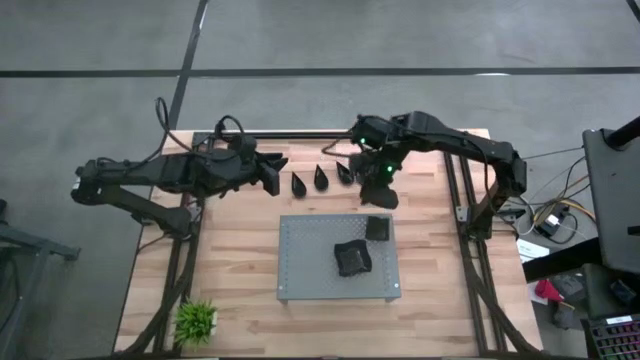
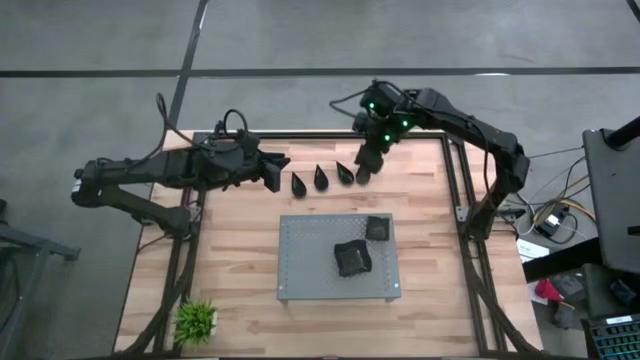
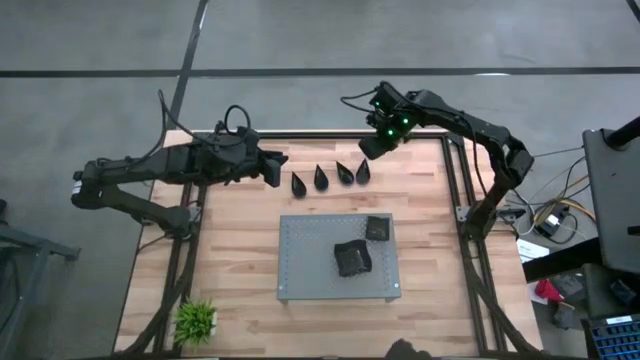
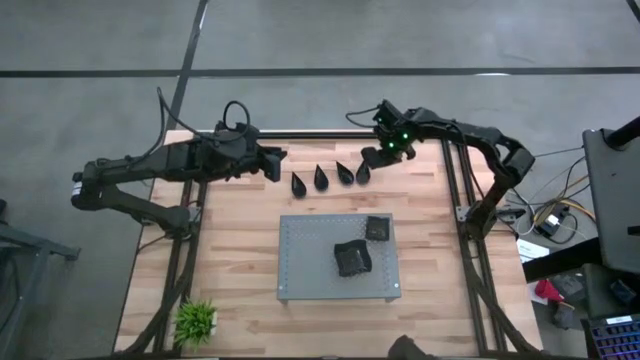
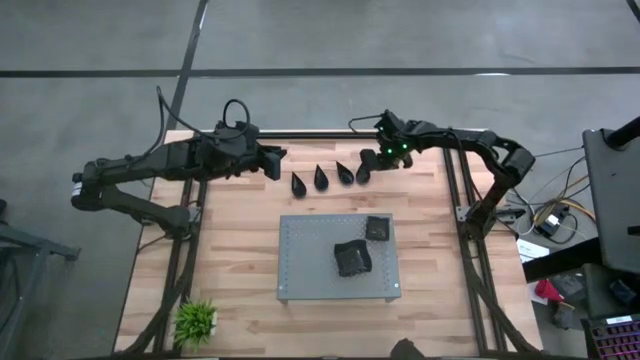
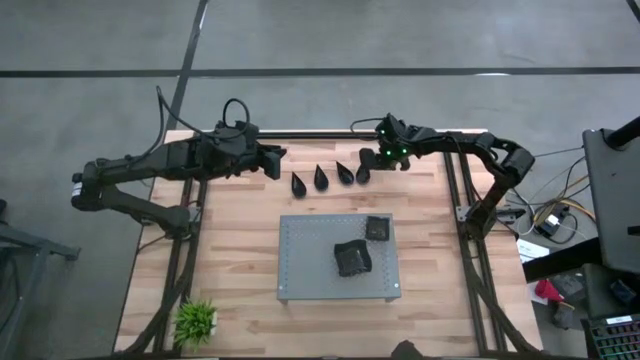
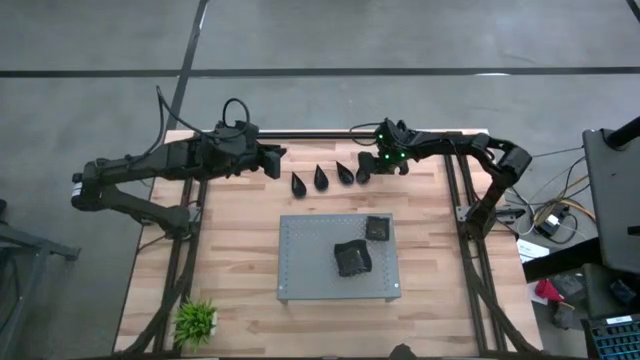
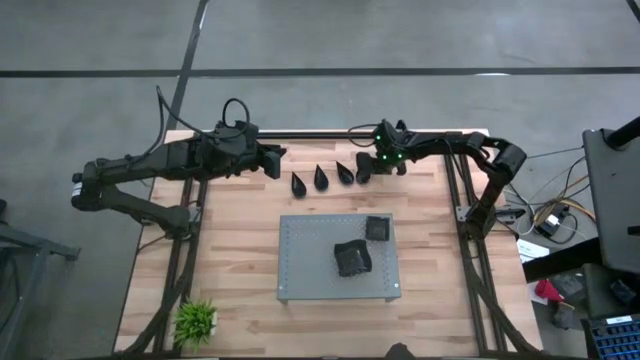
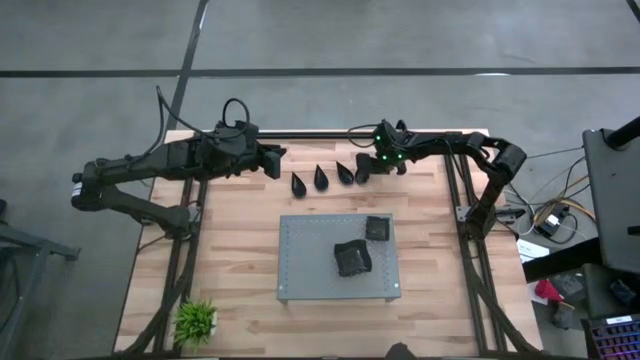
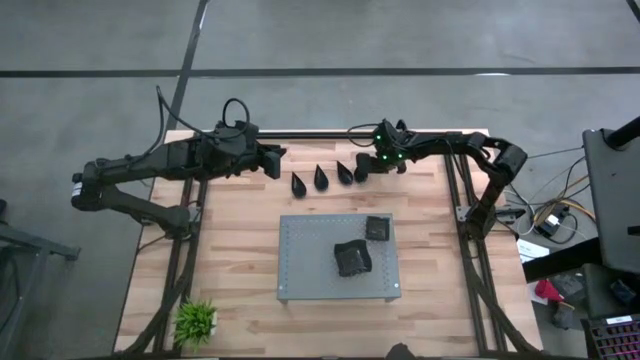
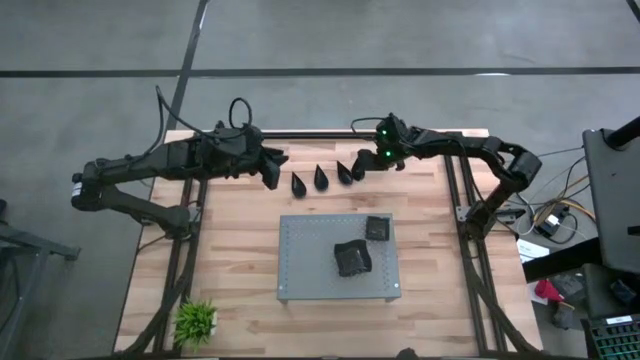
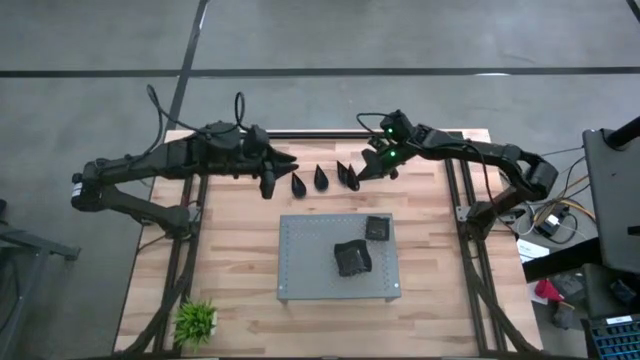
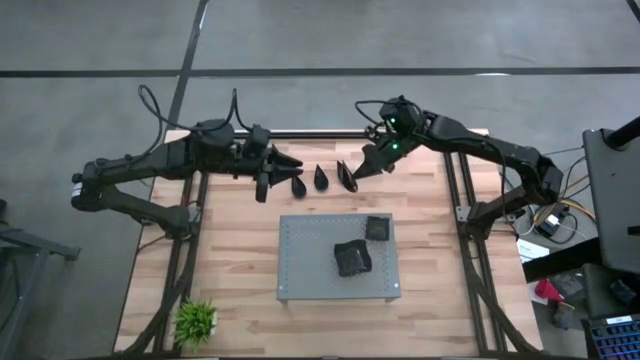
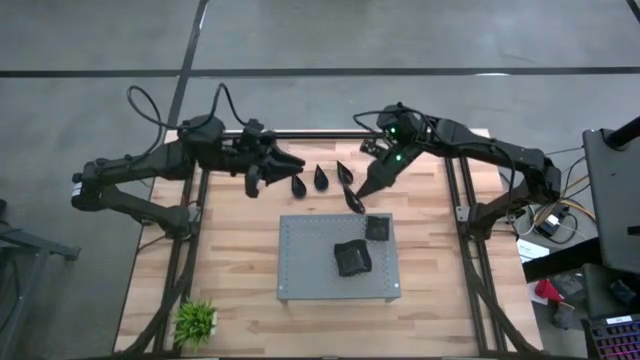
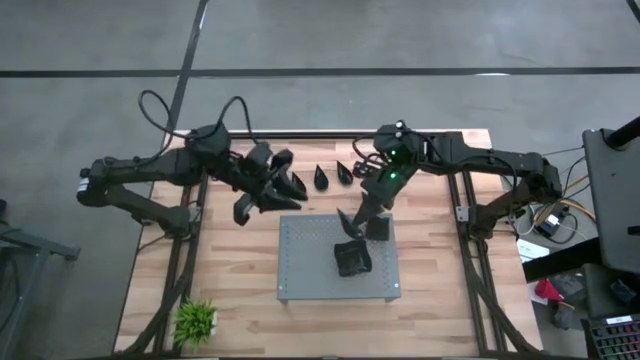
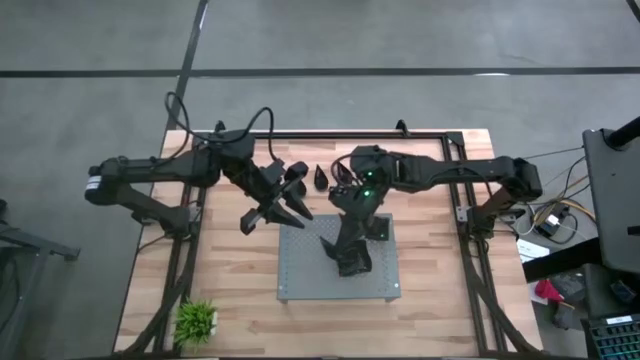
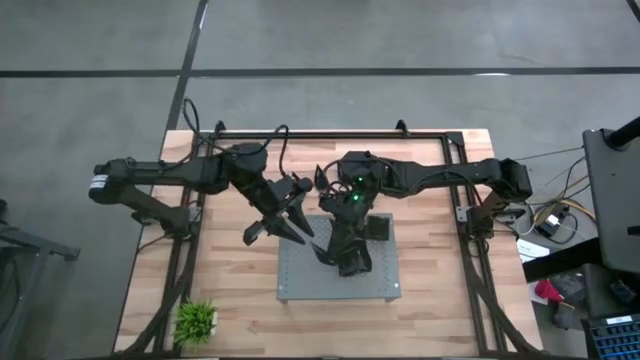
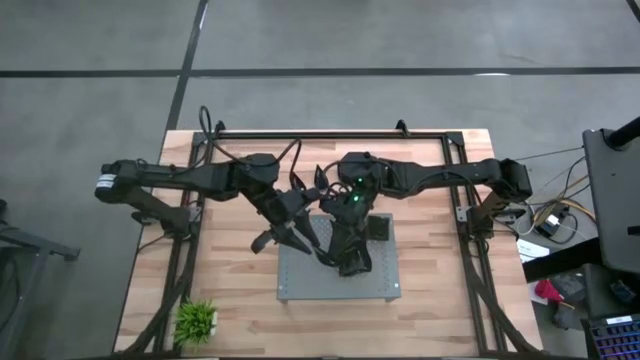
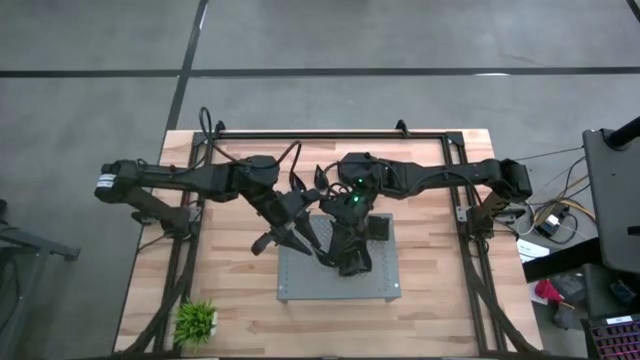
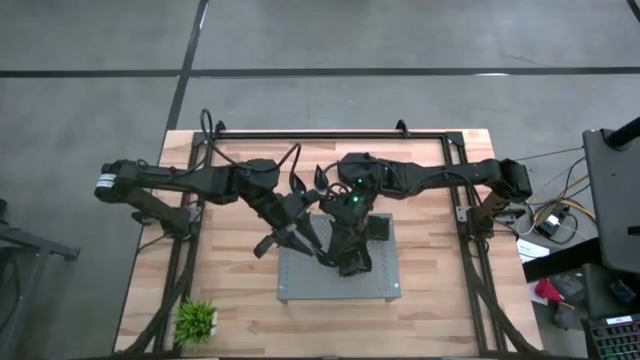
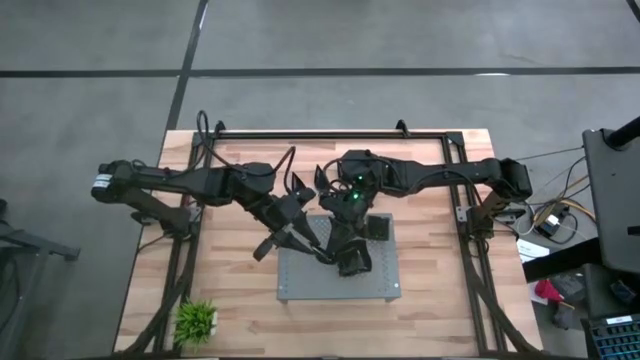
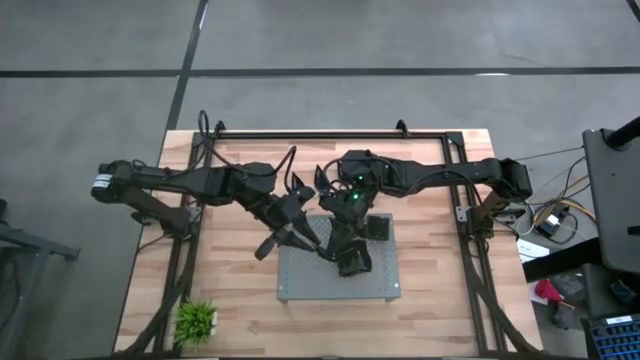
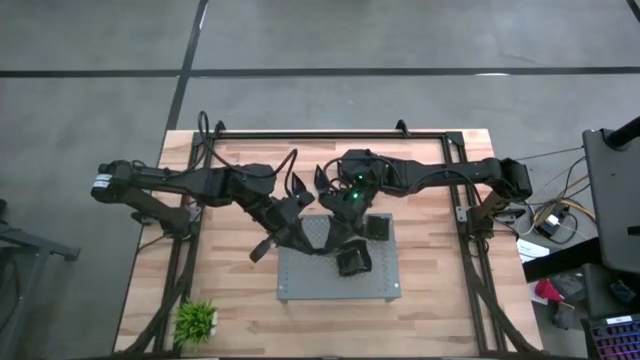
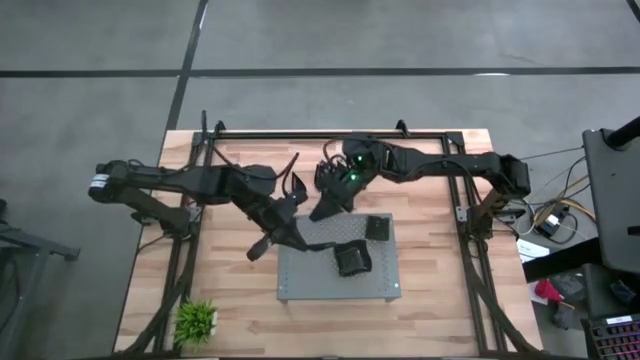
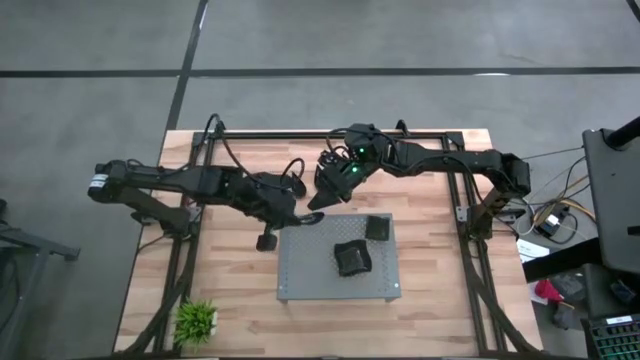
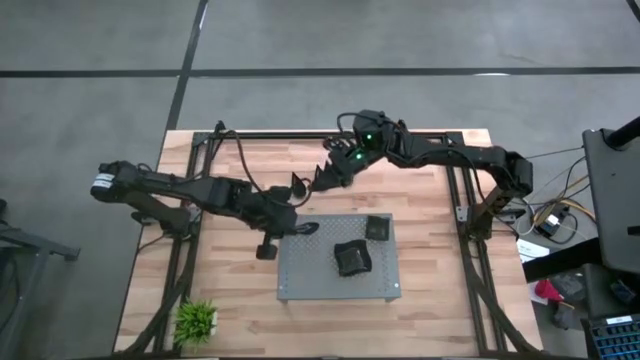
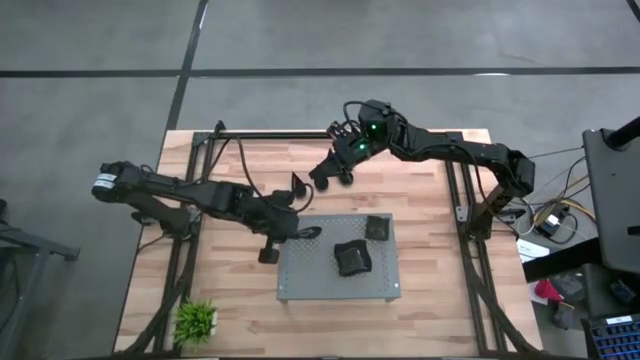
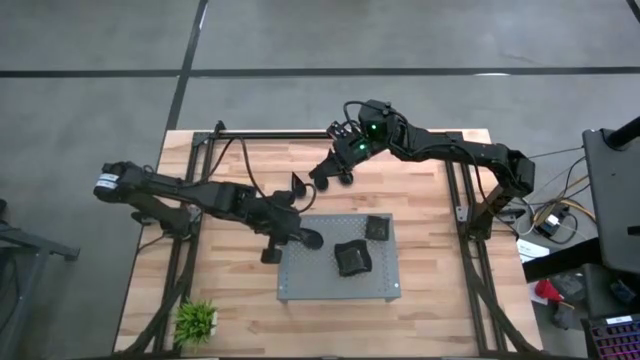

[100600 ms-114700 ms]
Task: Pick & Place Mini shaped plates
Put the drop shaped plate on the shelf

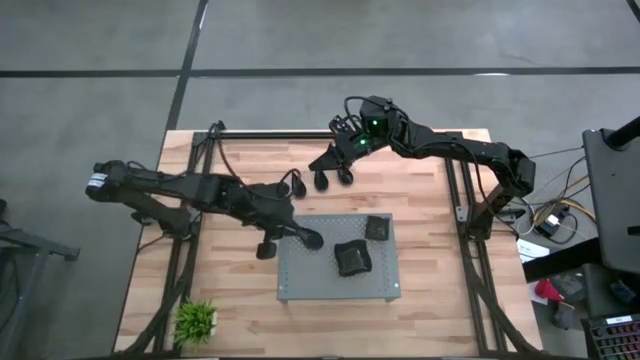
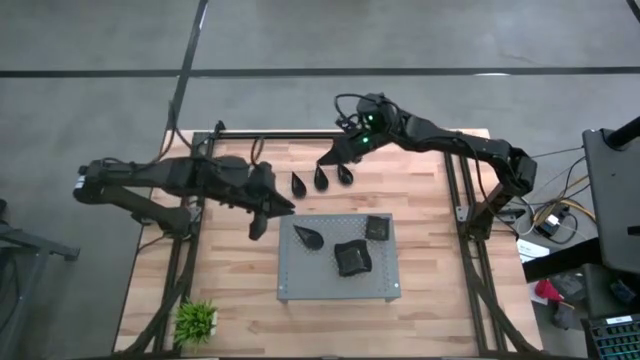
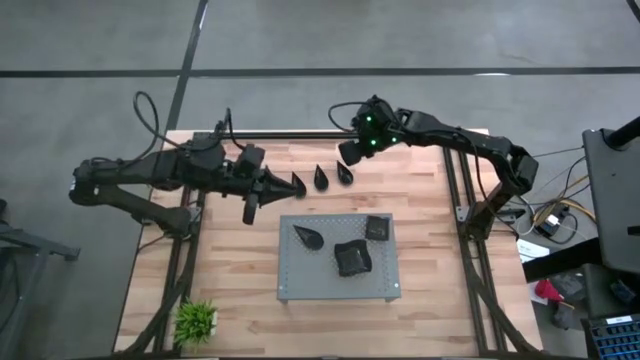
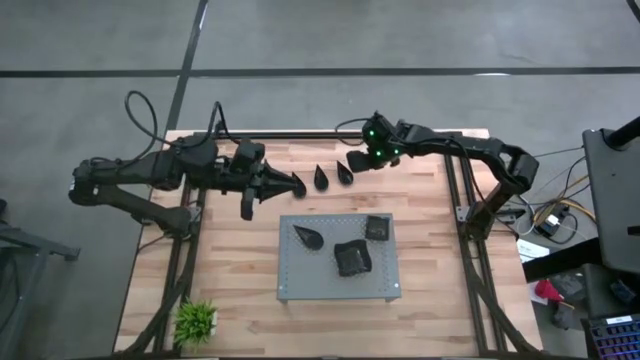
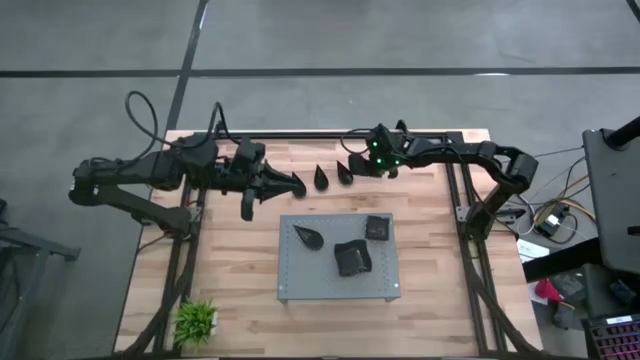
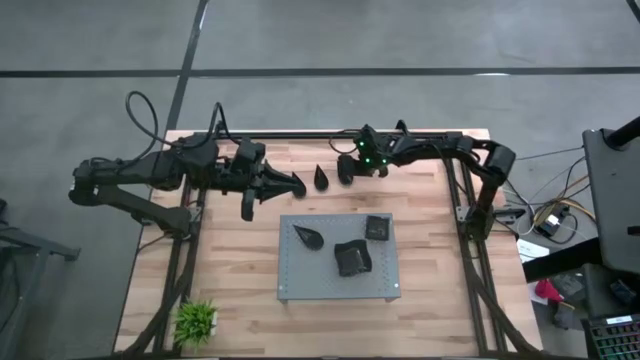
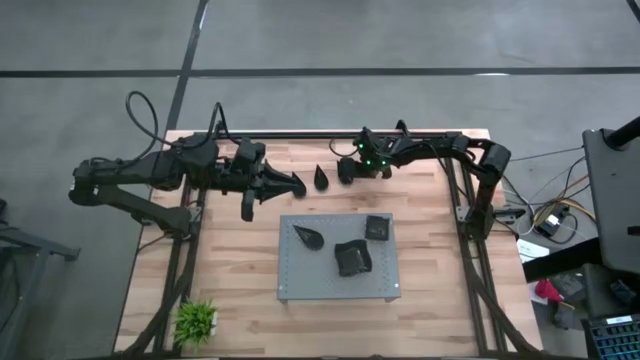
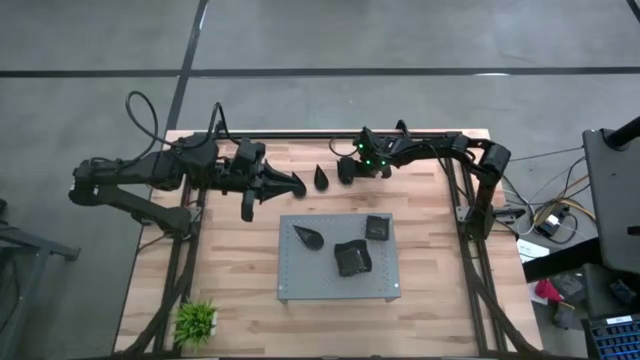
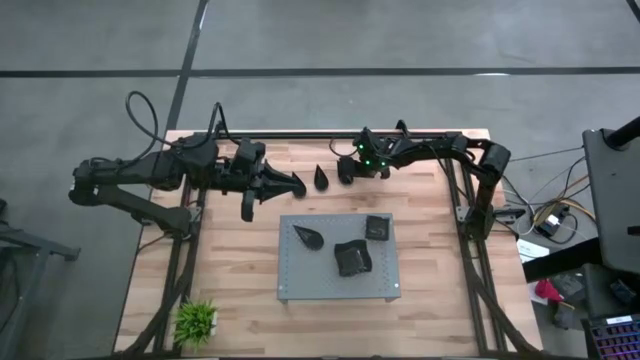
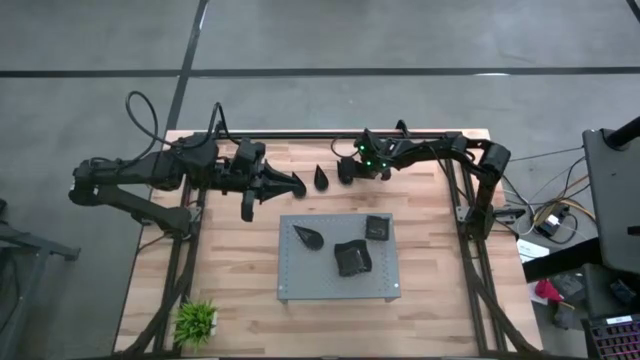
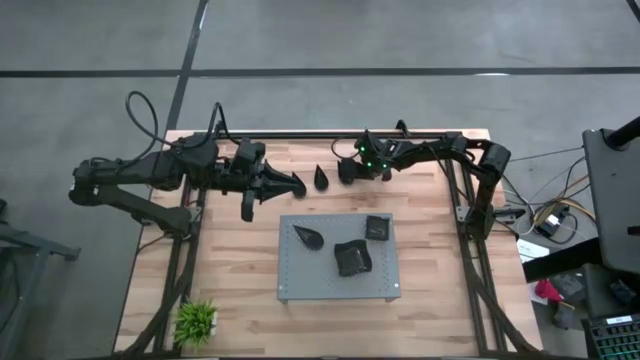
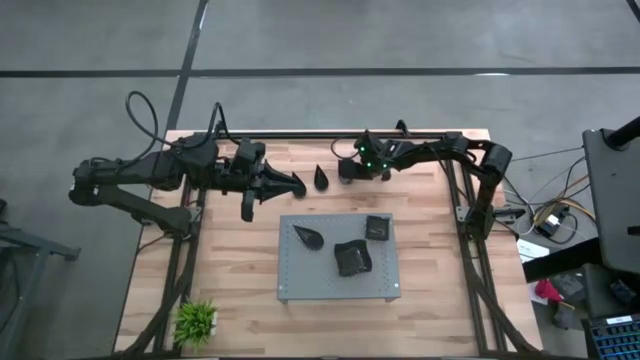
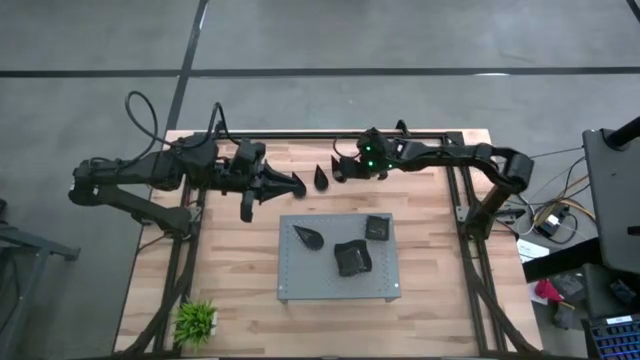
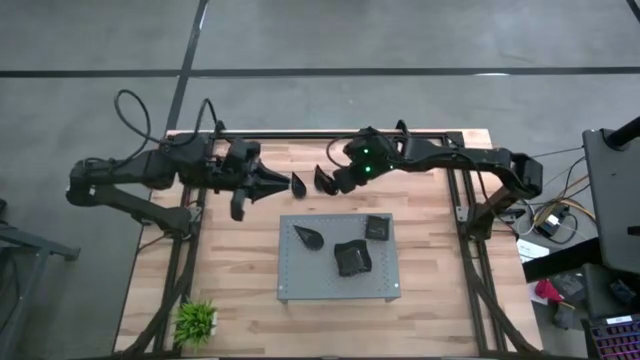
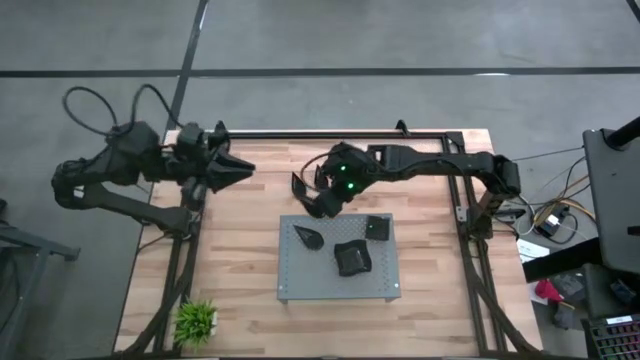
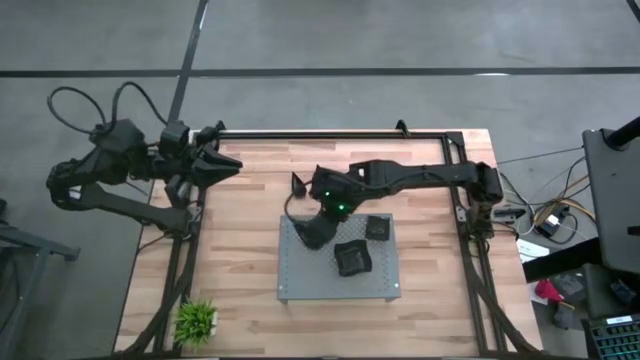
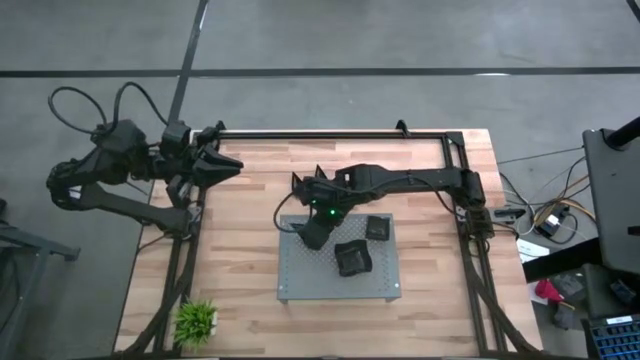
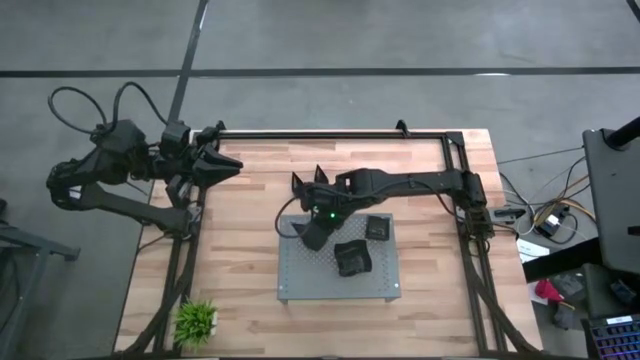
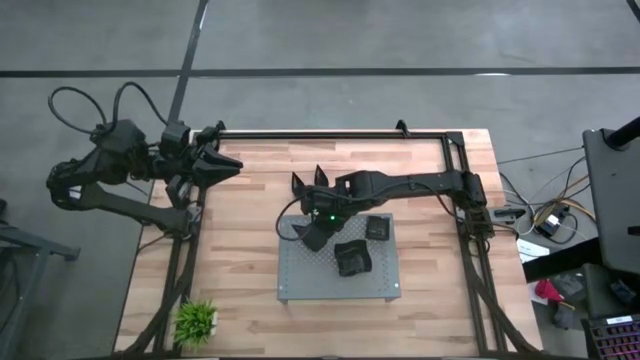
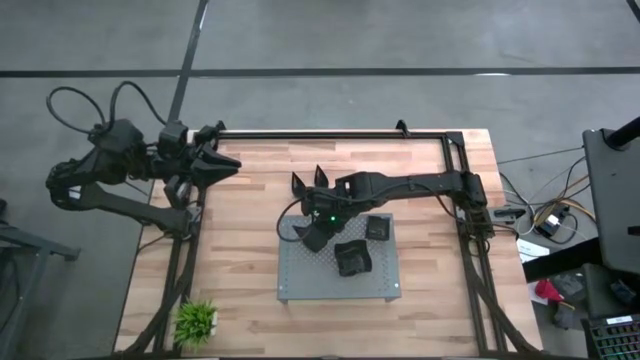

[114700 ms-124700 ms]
Stack the drop shaped plate on top of the other drop shaped plate on the shelf
